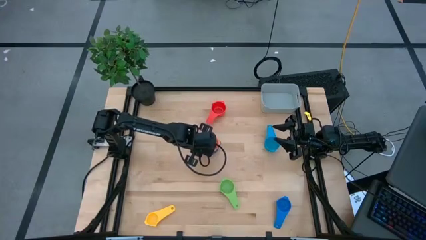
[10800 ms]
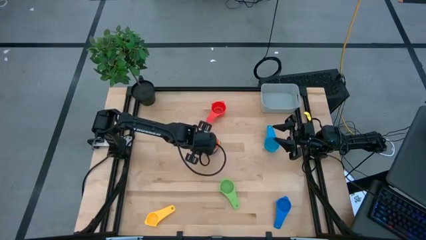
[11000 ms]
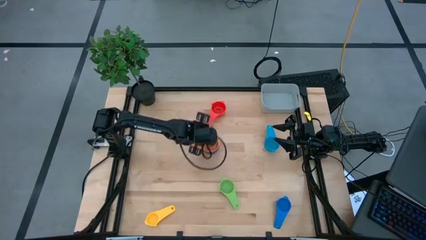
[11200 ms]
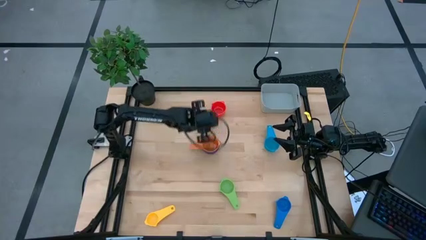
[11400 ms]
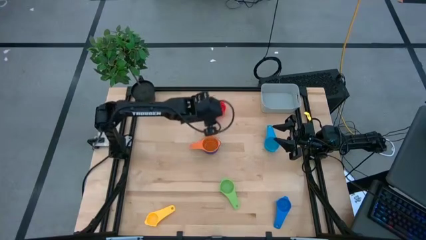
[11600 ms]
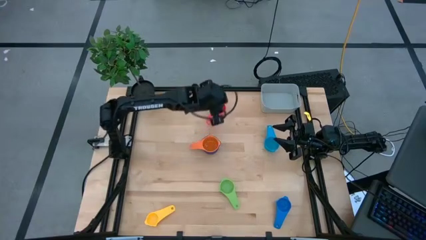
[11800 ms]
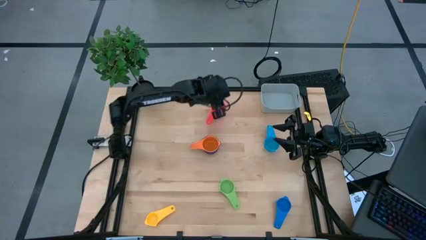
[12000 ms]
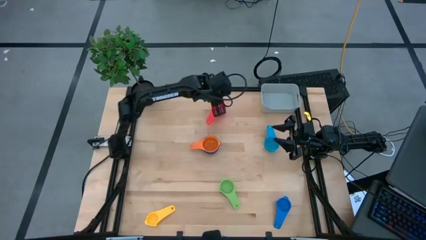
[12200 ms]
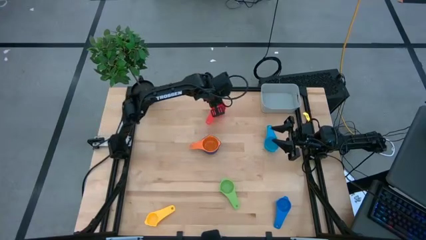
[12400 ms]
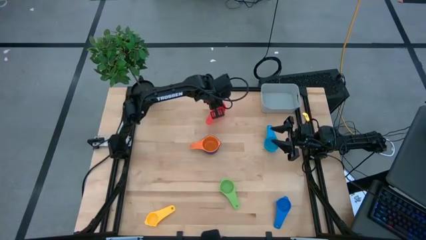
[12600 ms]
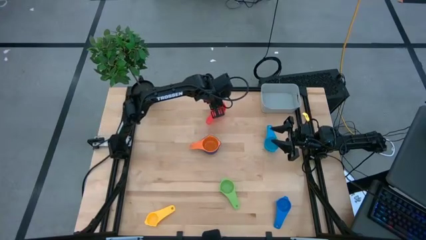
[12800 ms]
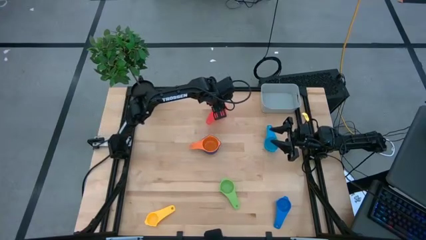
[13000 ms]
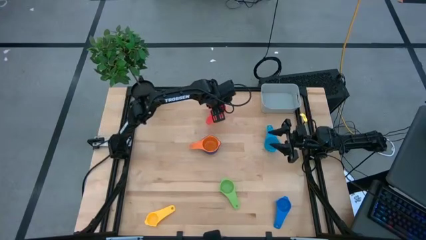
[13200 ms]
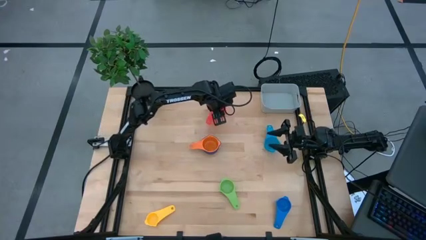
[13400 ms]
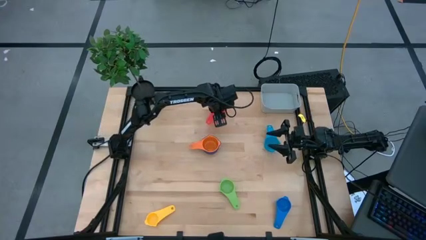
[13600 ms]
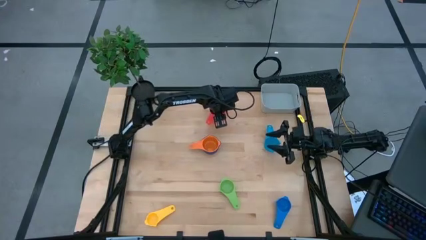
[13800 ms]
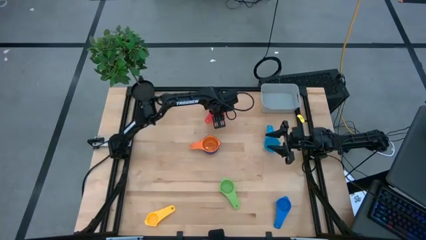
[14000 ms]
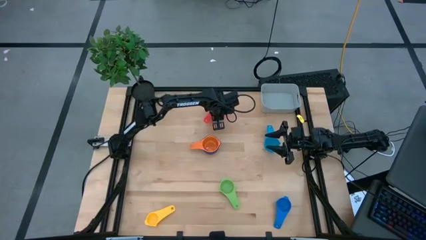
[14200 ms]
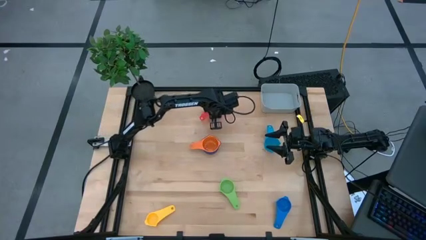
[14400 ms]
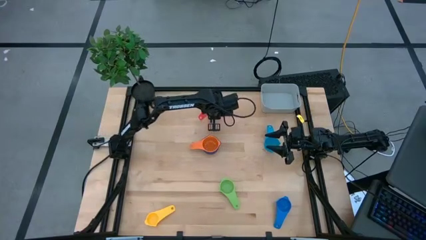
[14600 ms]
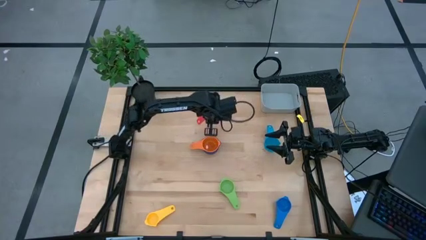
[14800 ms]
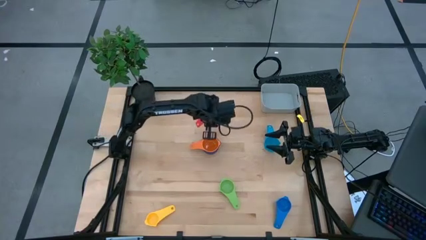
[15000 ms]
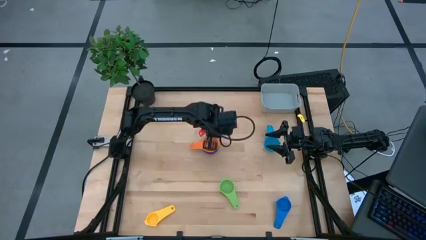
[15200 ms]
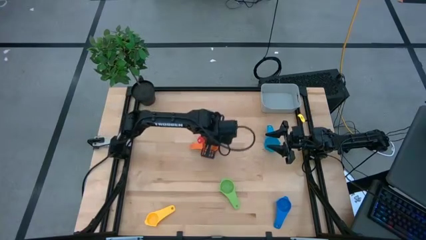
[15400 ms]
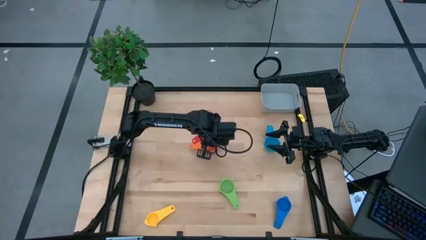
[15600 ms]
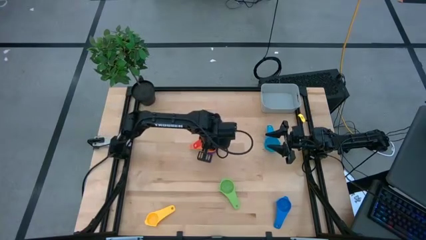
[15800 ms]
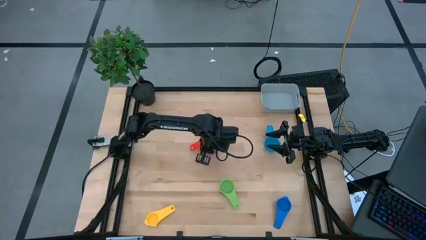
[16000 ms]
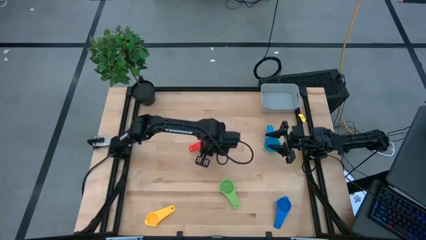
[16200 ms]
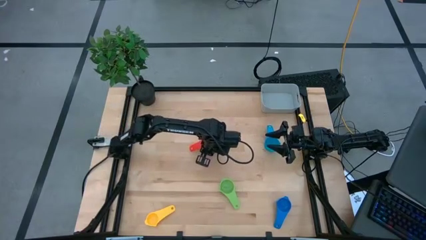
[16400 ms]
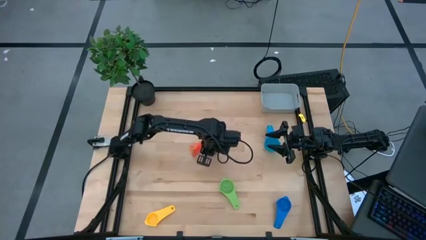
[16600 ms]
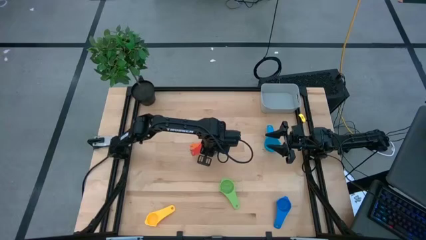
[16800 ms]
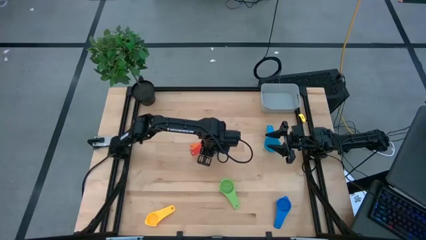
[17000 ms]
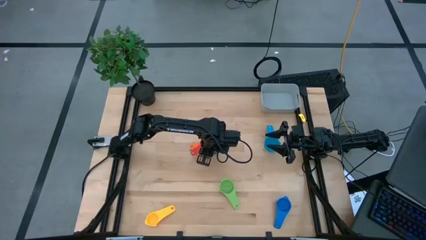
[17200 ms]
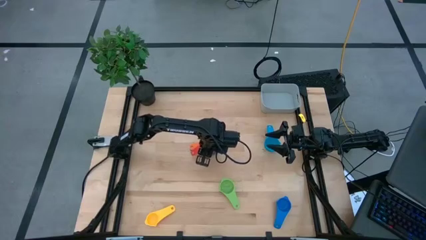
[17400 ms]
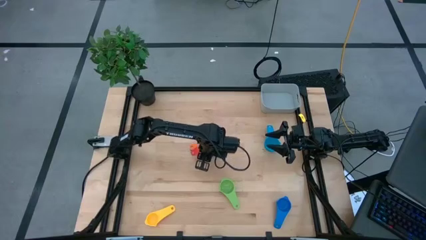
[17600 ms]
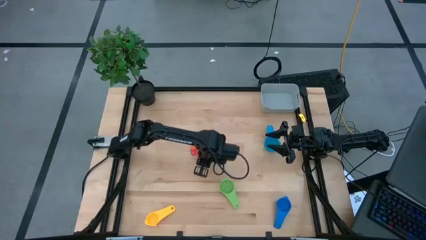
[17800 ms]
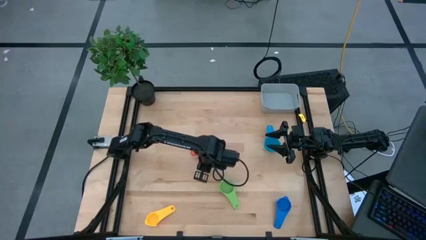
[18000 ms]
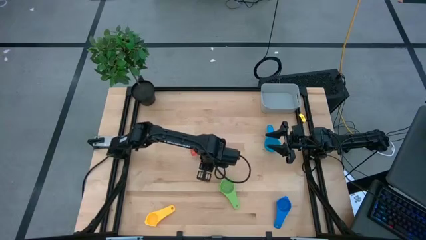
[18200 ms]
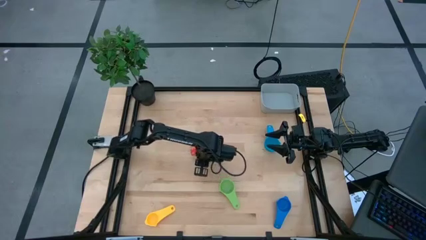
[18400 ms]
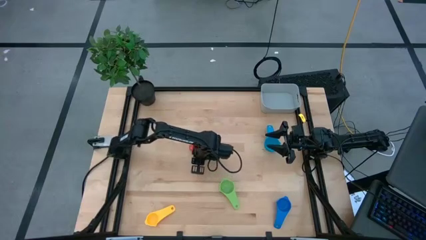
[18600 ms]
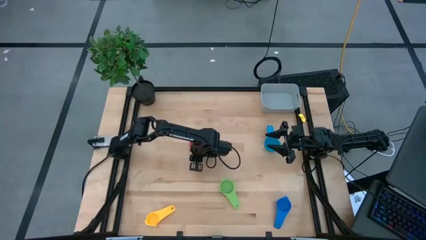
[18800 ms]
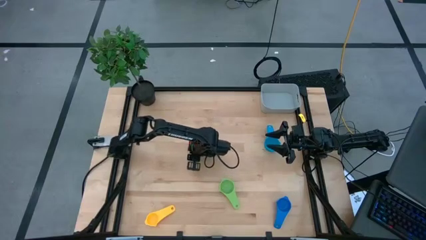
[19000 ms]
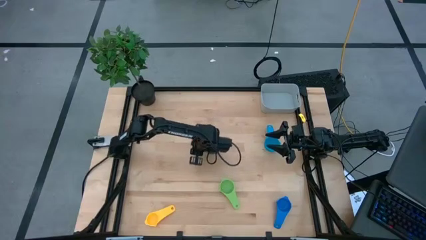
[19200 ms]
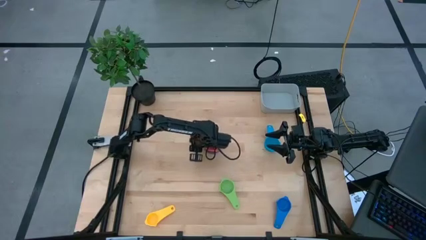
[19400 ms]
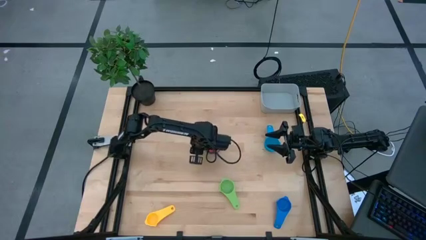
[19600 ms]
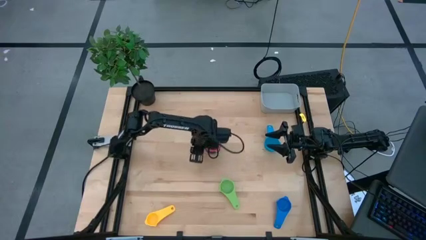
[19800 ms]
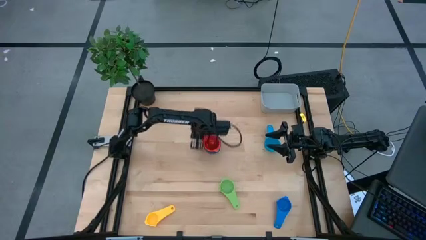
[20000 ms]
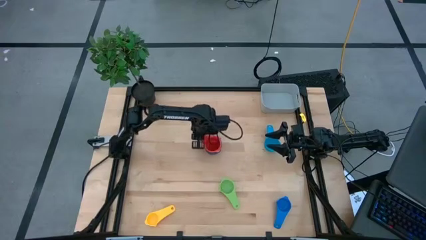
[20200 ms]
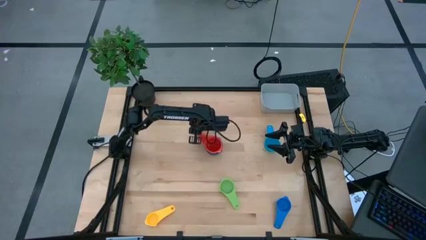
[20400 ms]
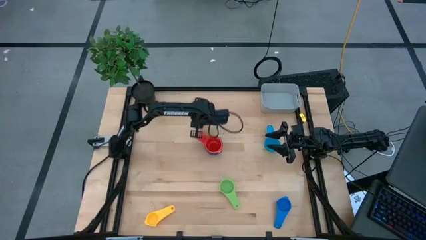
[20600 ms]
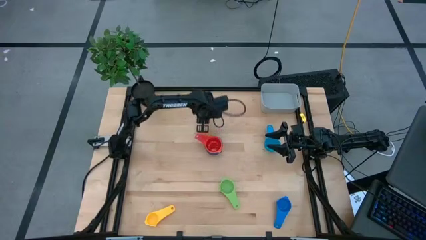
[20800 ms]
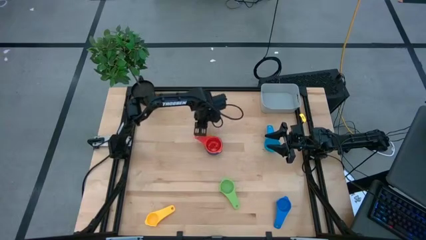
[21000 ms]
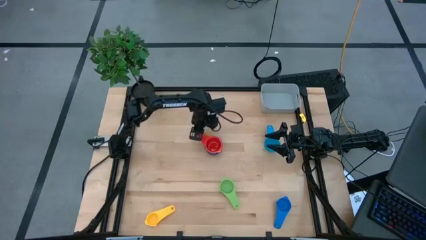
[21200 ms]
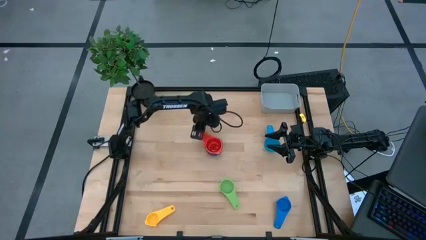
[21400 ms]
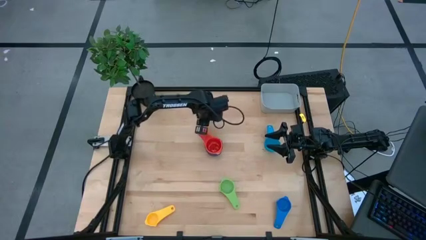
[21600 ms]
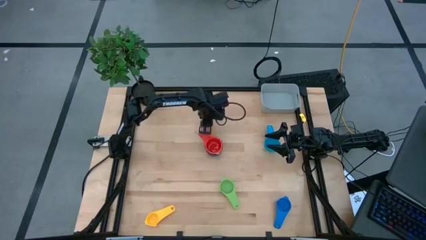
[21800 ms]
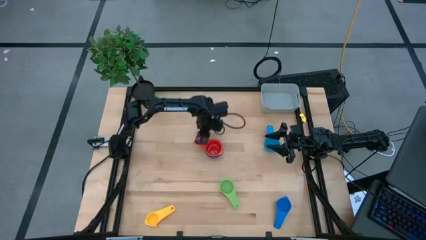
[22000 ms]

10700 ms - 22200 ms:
Task: Nest measuring cups in basket
Stack the red measuring cup on top of the orange measuring cup

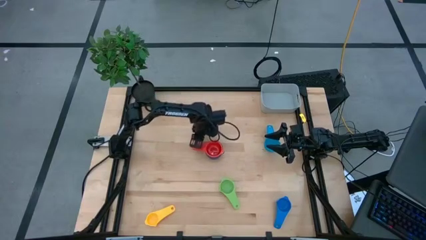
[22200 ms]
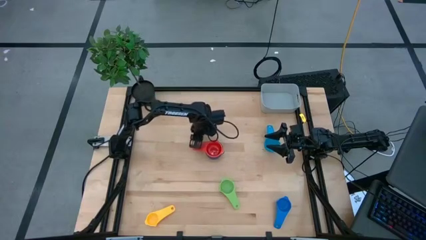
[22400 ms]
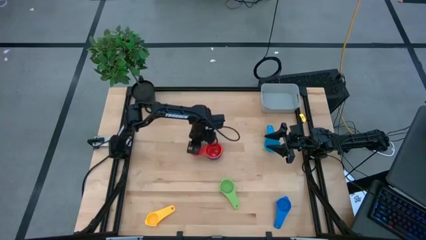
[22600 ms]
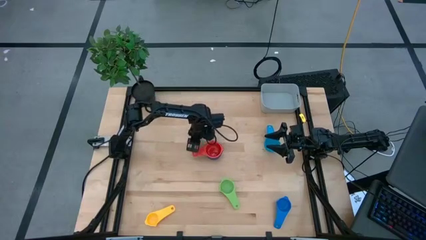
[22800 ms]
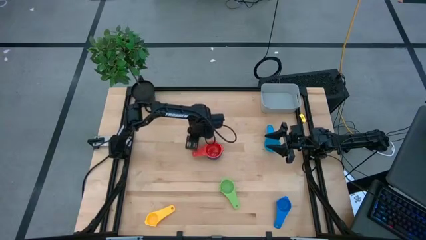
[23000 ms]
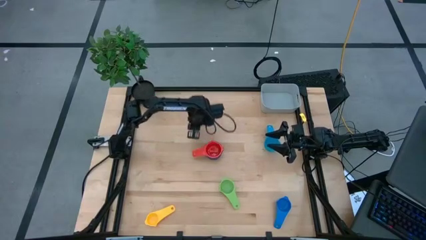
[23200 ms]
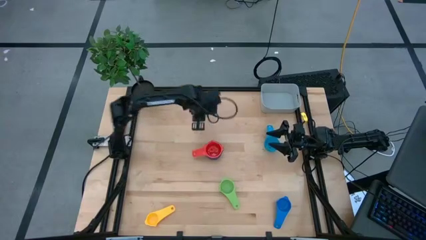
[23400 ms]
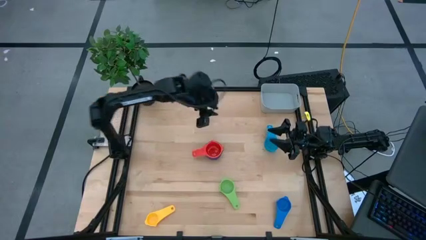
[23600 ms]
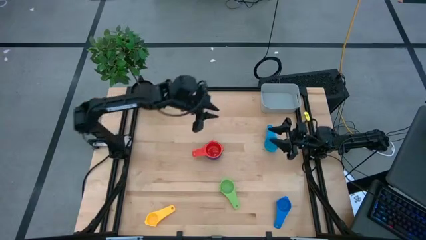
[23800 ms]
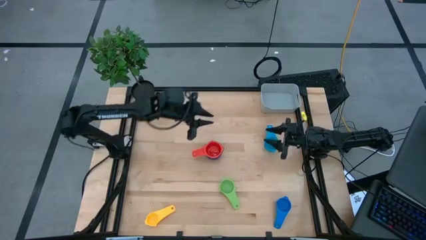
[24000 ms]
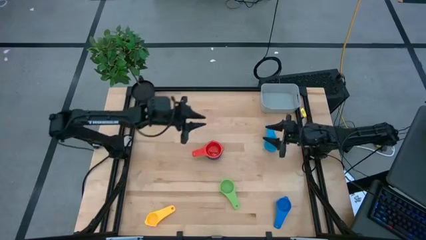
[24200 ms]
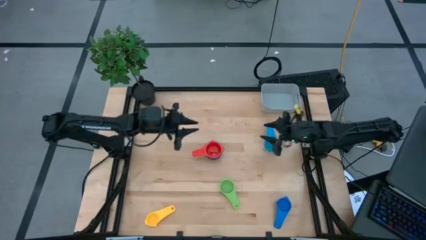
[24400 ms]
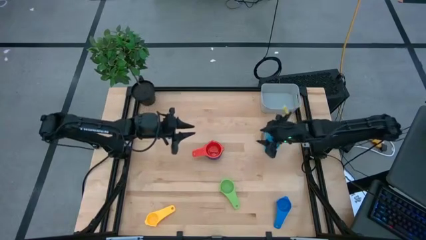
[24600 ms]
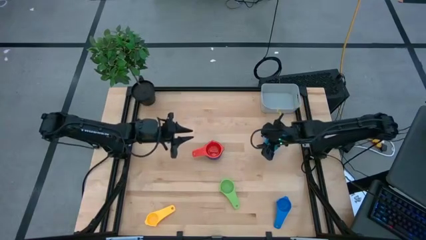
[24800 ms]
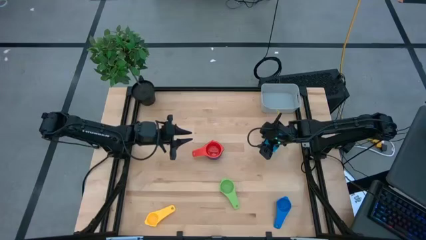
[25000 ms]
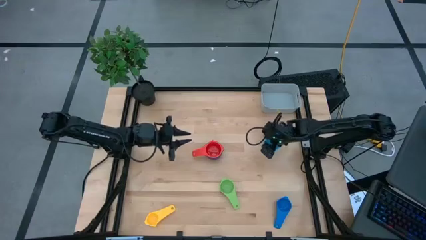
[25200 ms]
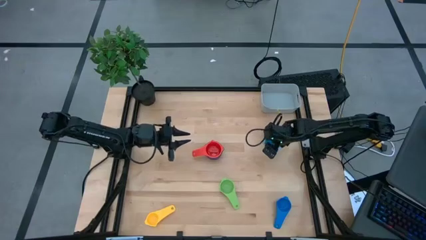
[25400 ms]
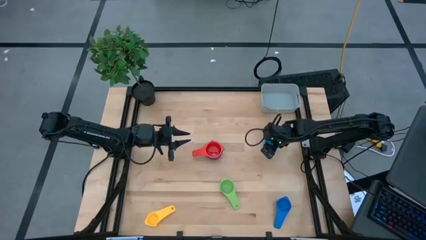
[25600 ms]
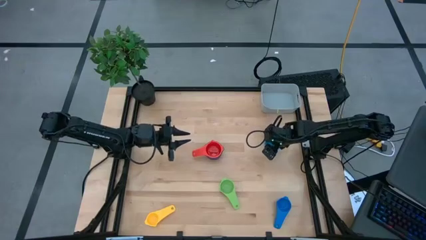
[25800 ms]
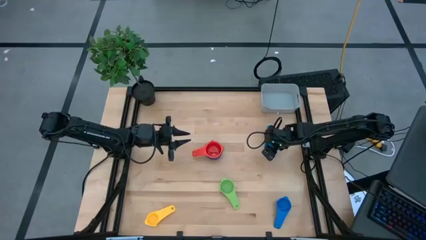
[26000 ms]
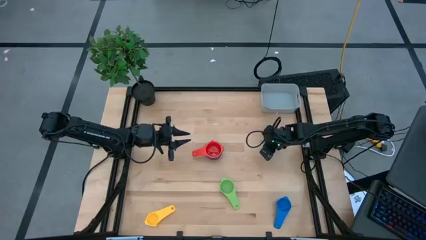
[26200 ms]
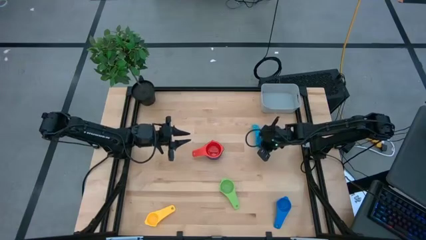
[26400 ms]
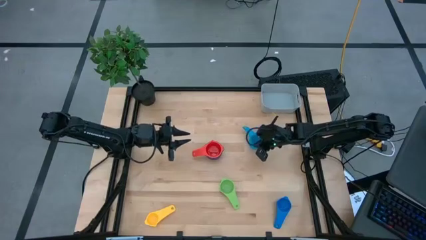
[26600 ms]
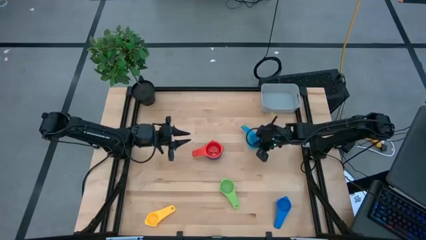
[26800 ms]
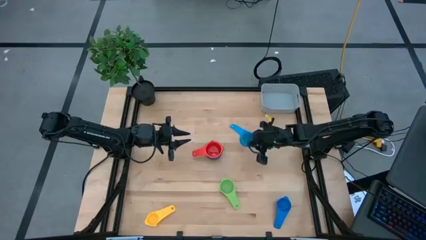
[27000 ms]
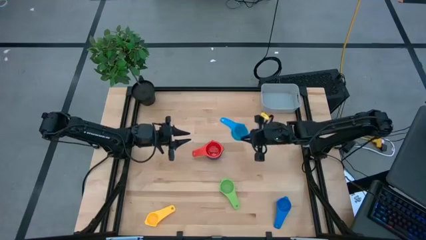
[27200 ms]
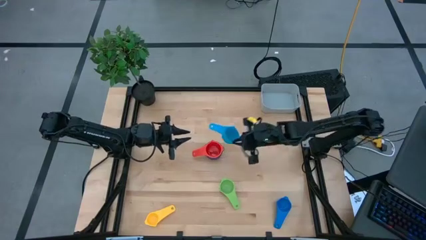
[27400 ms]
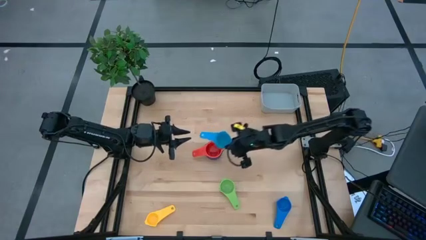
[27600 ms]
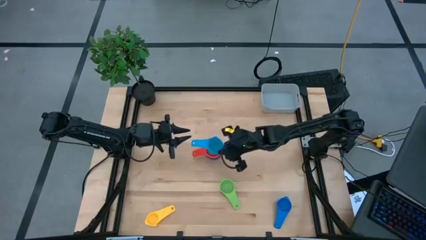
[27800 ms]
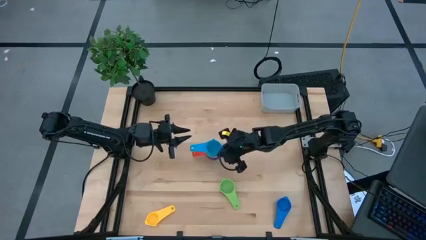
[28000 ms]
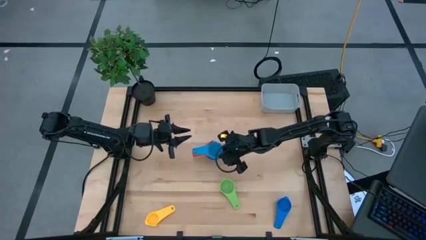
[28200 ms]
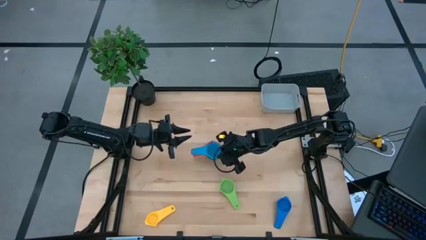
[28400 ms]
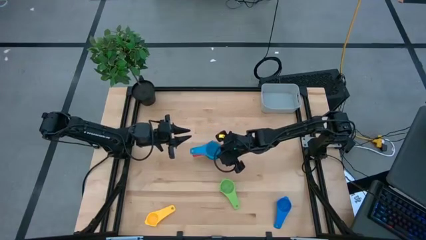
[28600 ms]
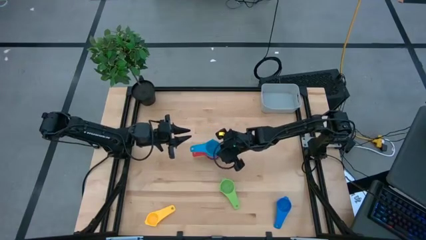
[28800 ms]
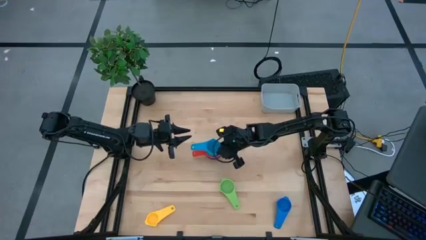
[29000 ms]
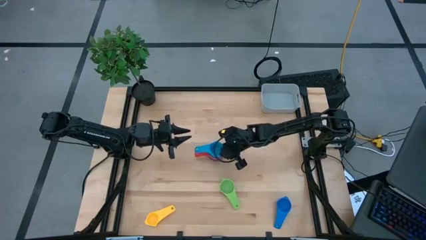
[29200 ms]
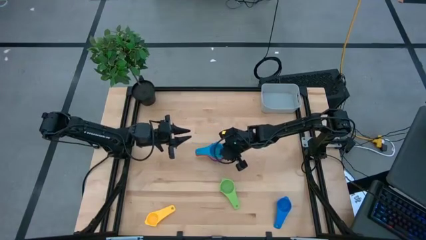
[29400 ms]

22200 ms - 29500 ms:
Stack the light blue measuring cup on top of the red measuring cup
